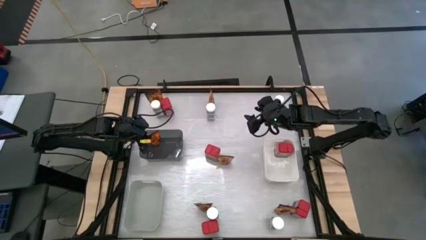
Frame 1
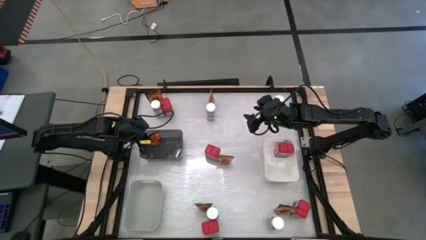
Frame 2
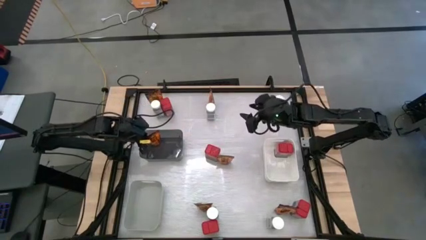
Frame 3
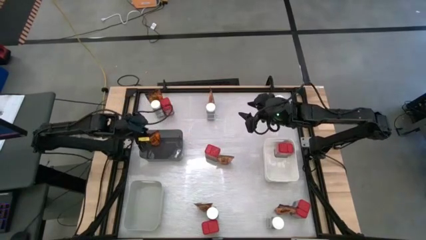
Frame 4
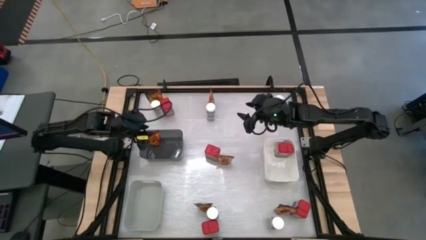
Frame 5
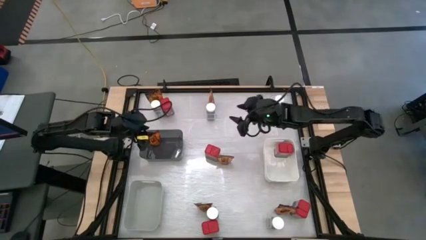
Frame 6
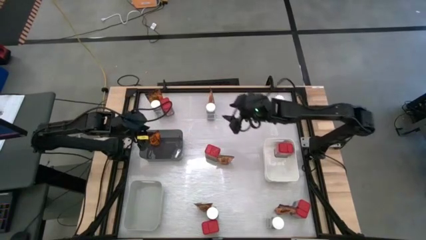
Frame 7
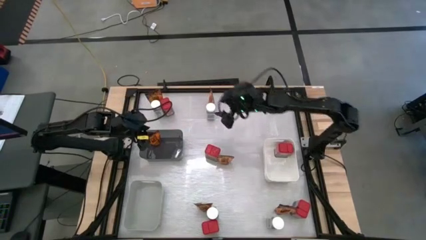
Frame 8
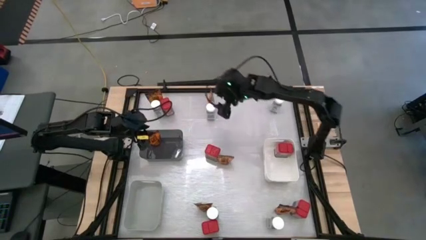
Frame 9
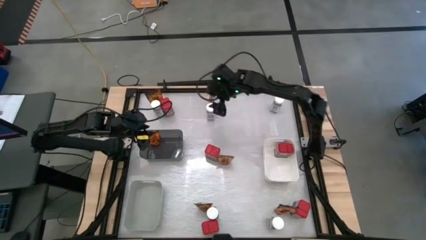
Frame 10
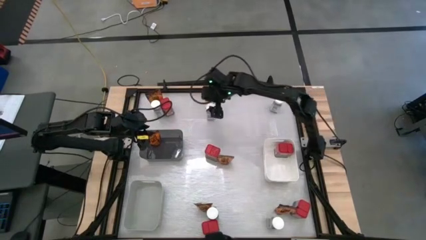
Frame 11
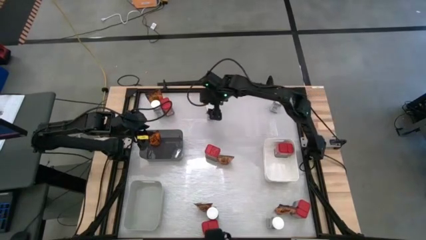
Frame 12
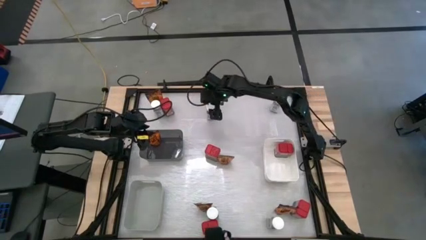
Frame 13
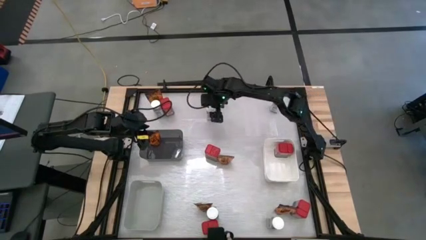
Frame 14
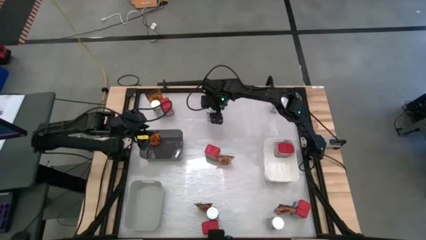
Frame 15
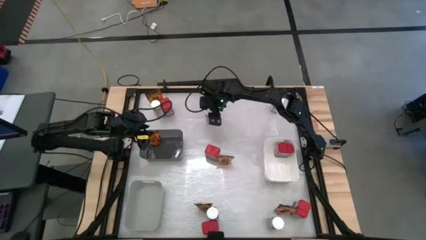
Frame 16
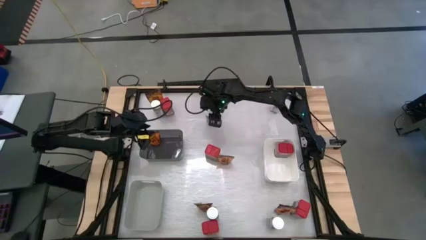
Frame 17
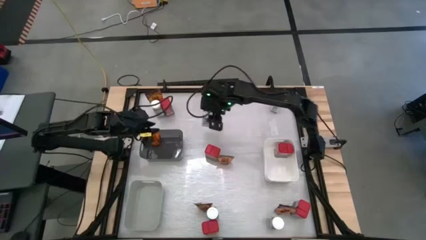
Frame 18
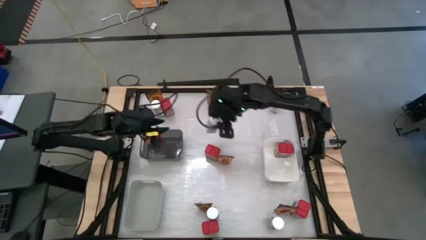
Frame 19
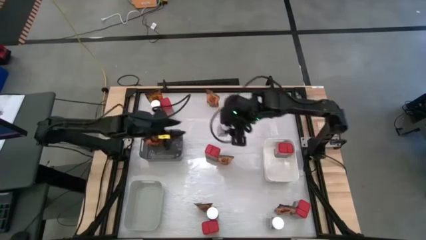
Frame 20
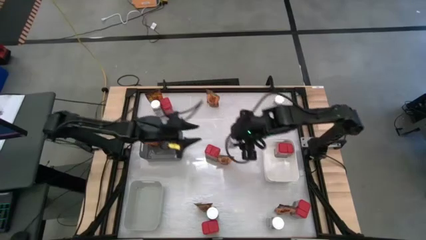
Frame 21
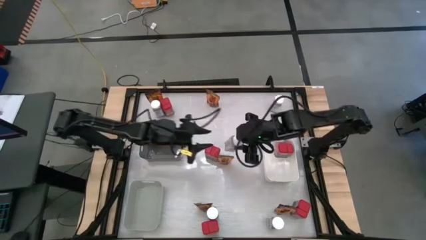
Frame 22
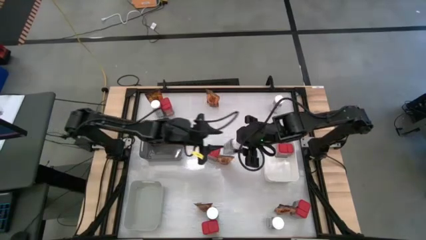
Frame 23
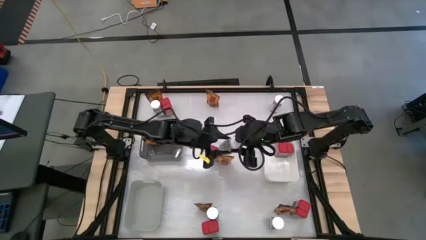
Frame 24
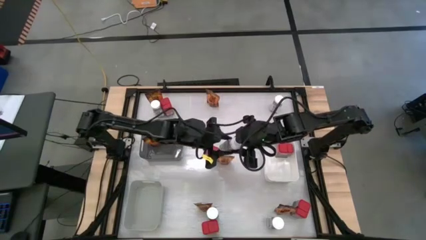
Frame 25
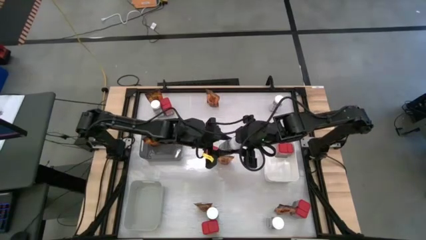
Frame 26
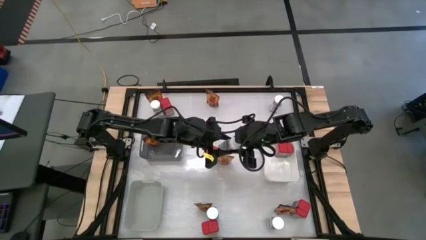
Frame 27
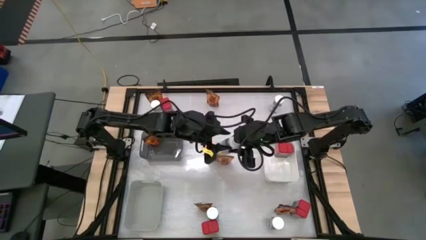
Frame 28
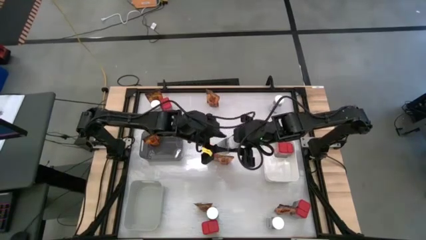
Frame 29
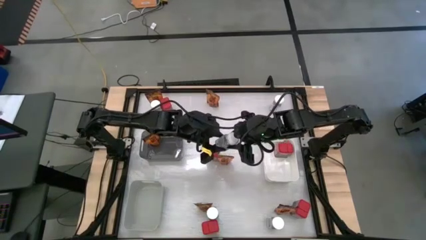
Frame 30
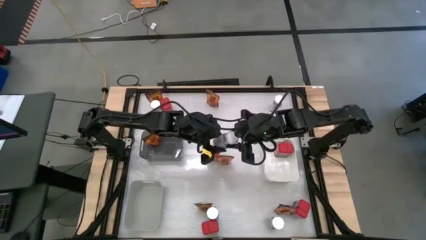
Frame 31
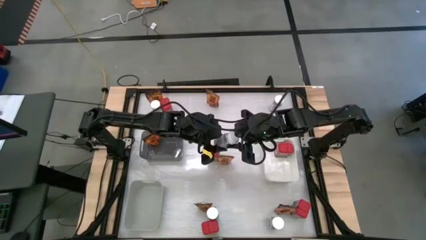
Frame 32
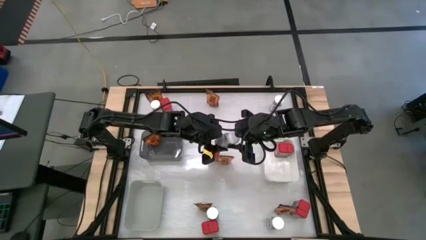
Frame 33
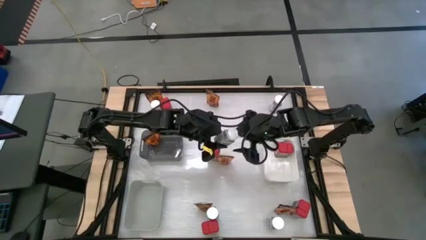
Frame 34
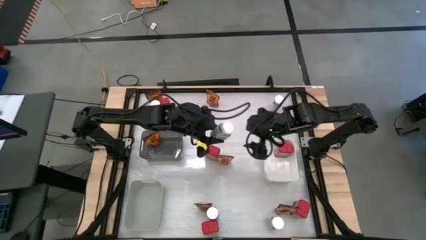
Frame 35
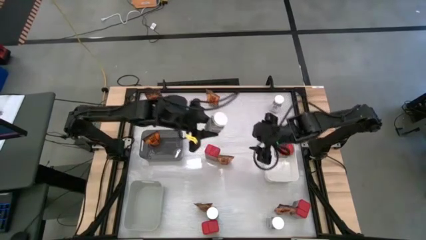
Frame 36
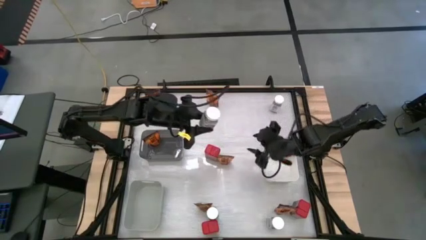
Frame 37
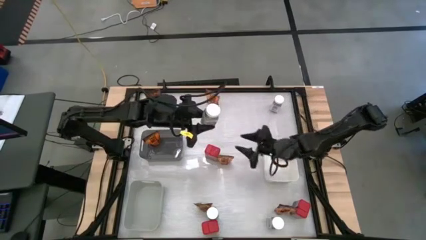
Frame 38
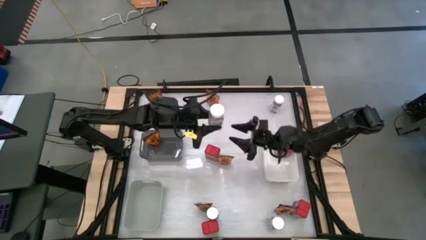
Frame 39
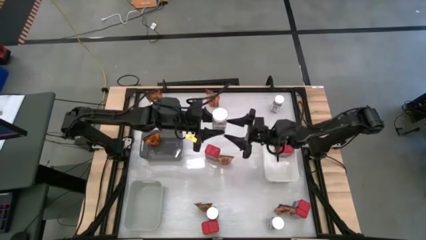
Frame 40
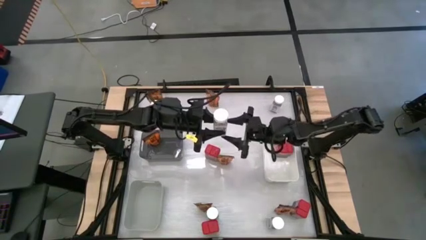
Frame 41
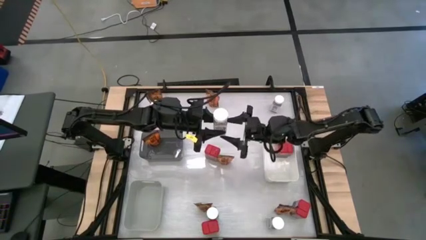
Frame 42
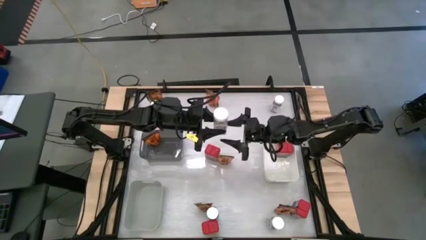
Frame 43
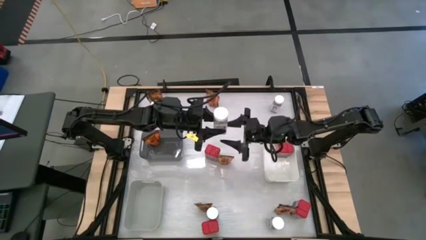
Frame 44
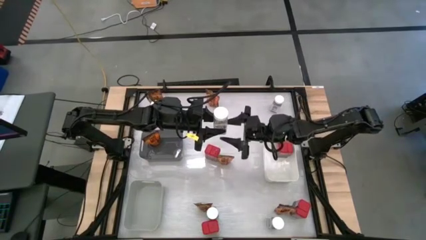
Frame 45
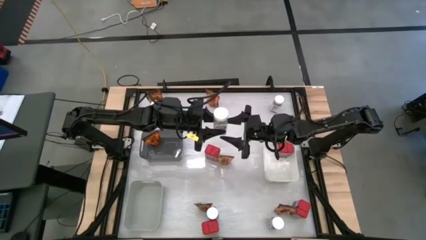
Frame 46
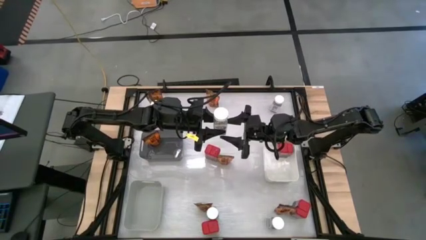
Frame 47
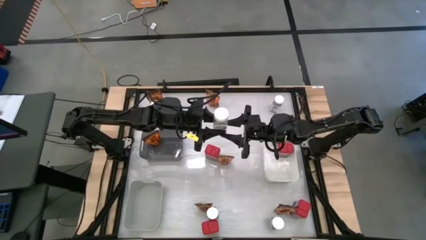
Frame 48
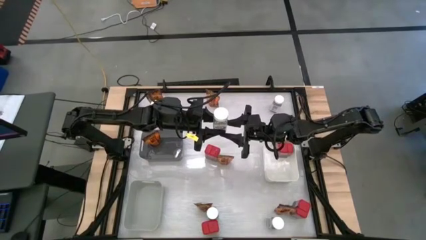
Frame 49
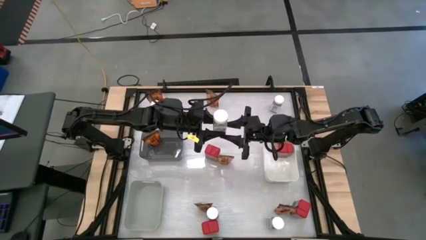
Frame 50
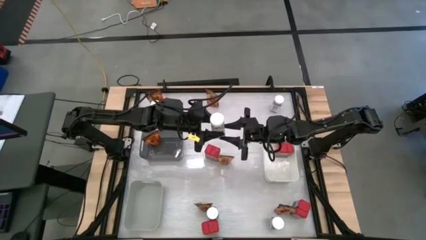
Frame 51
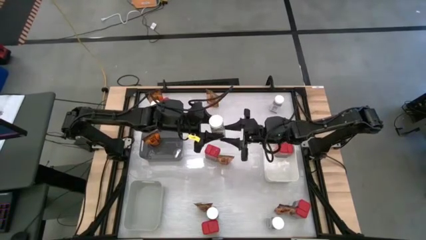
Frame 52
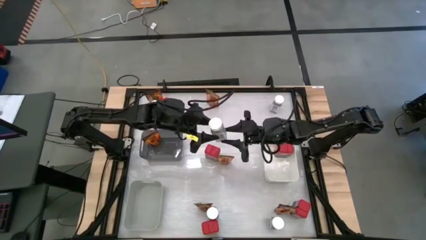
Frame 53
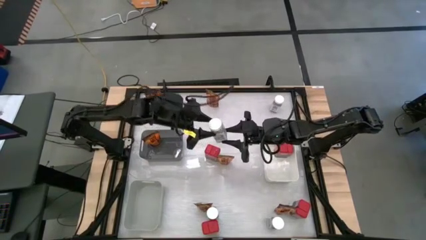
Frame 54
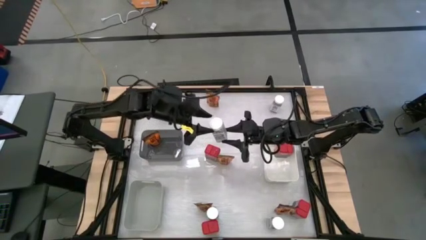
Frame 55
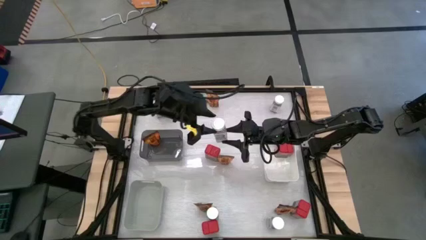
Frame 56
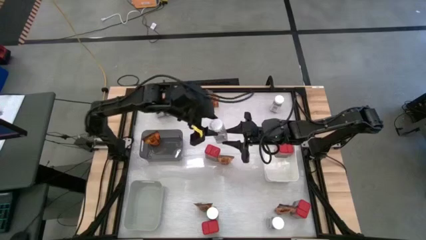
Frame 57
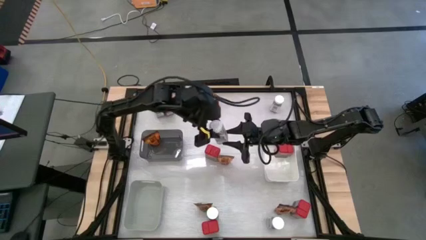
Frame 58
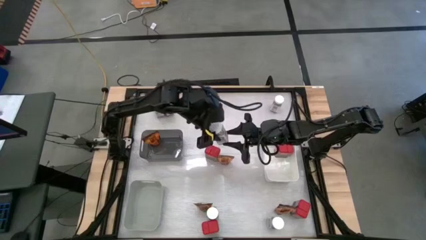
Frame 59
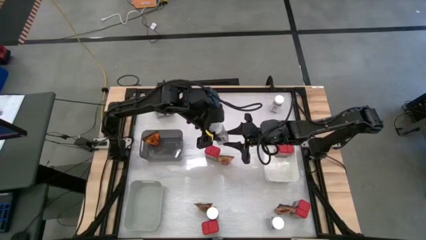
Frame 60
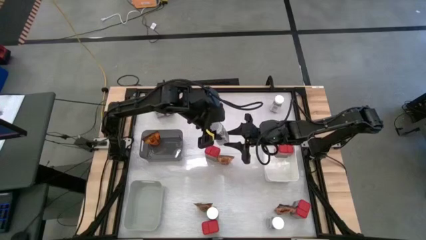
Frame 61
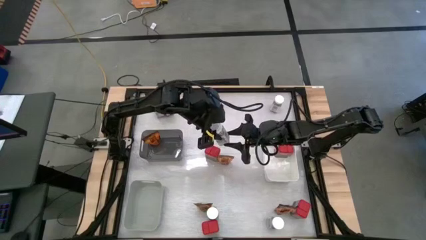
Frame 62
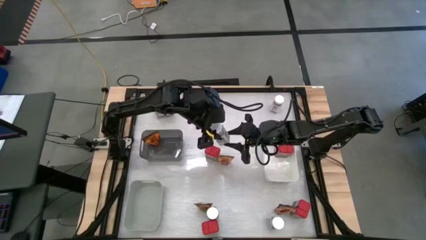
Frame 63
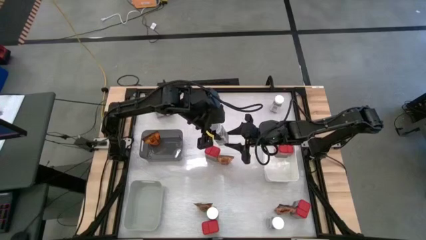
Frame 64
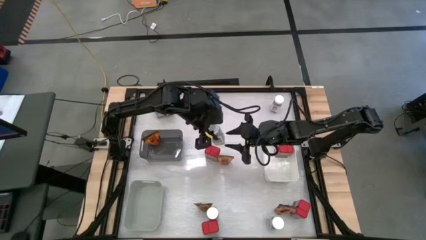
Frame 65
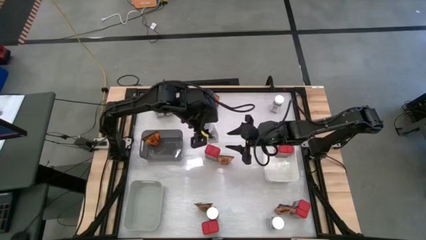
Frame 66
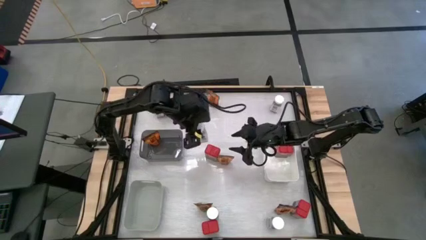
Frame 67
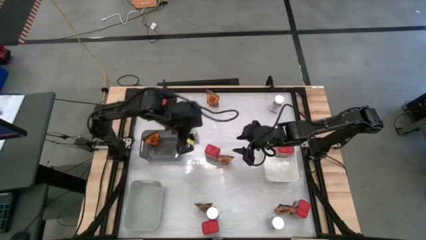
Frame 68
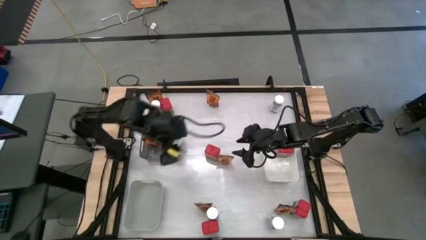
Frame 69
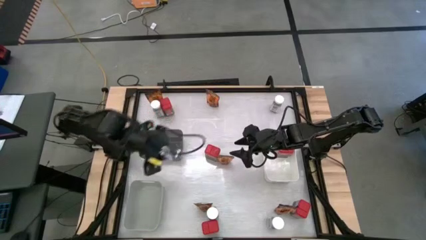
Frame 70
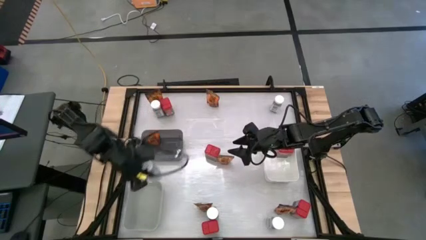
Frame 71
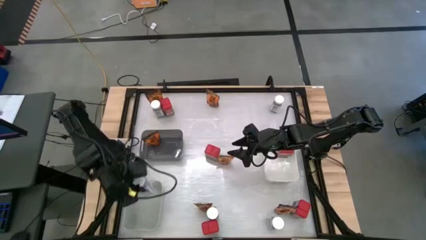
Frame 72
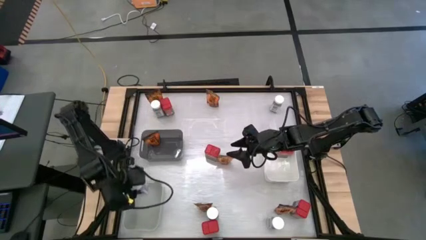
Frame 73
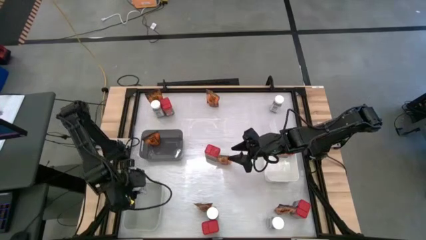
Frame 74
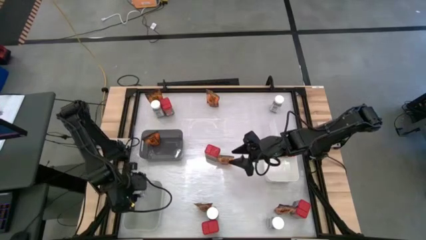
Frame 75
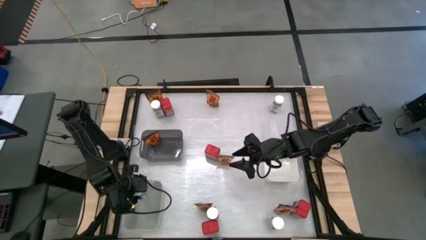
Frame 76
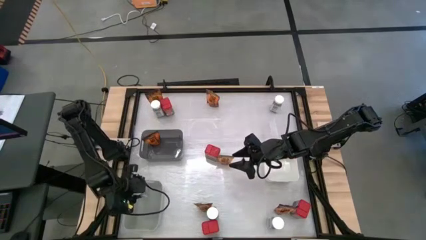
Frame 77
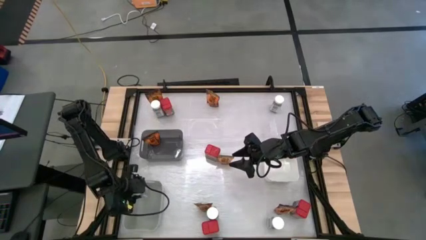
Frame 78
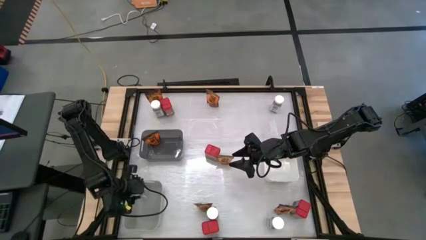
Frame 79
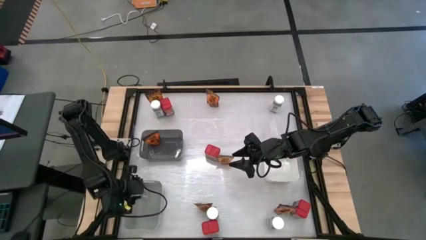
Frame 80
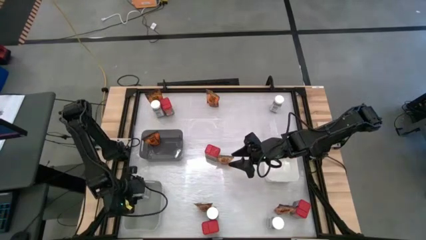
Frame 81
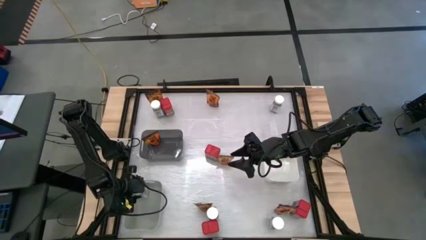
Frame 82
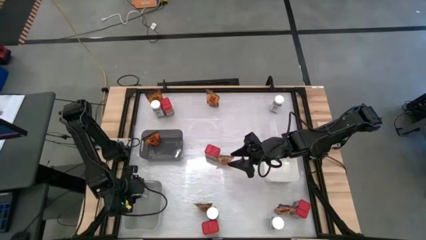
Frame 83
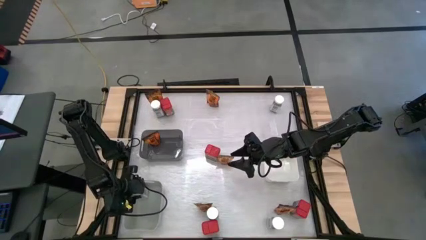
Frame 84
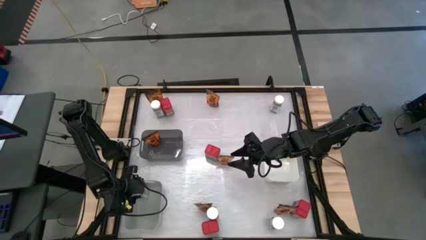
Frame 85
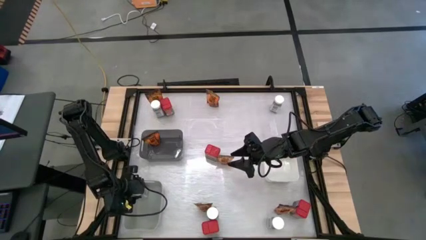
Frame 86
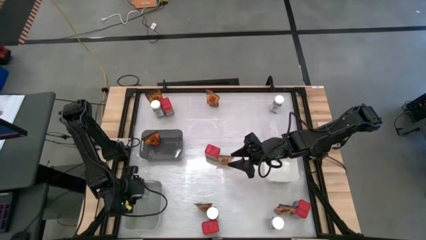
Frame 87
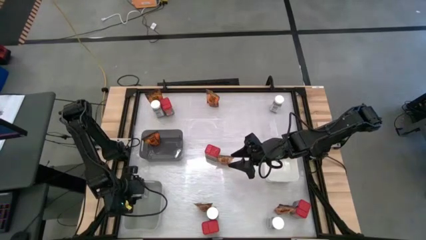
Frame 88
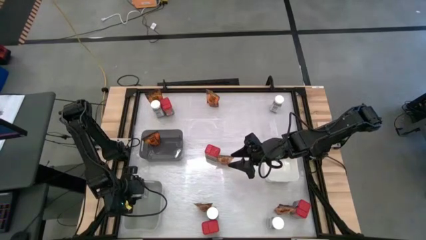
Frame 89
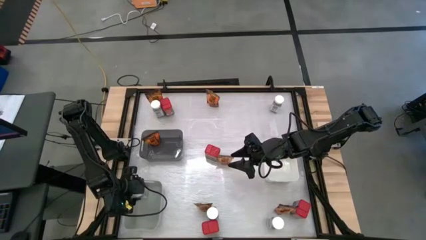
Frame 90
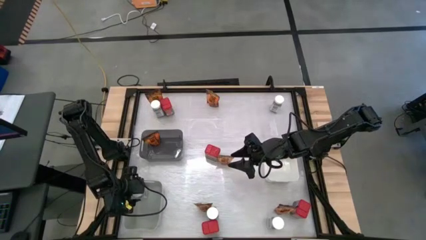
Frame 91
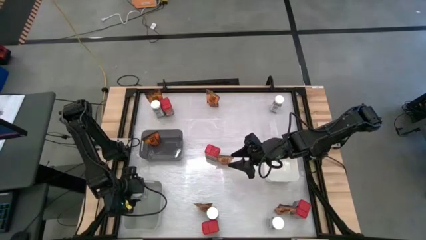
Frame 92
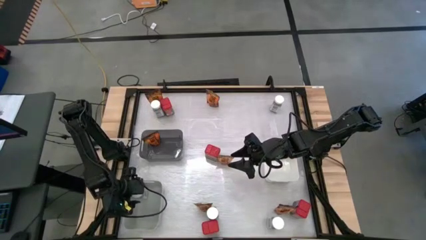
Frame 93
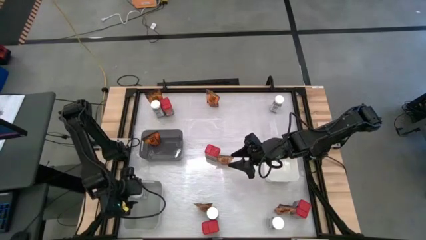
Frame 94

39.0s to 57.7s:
Task: Sort spices by type
Put the white spice bottle into the gray bin
